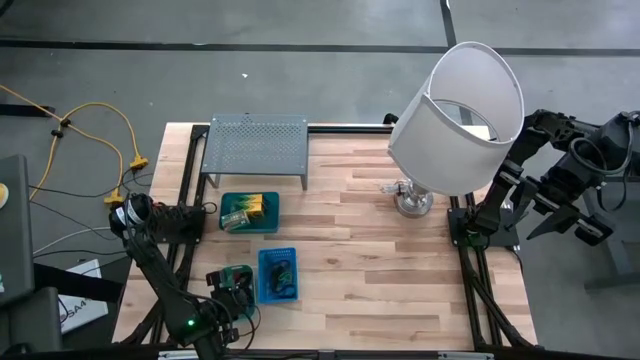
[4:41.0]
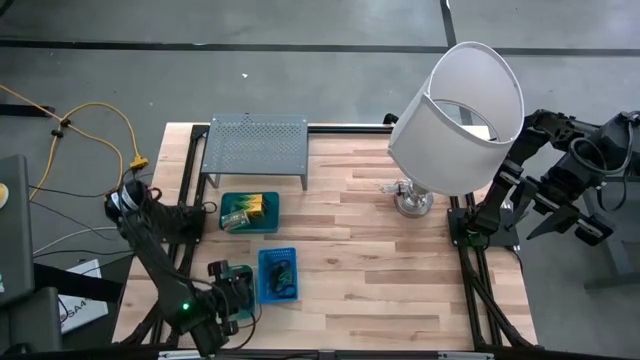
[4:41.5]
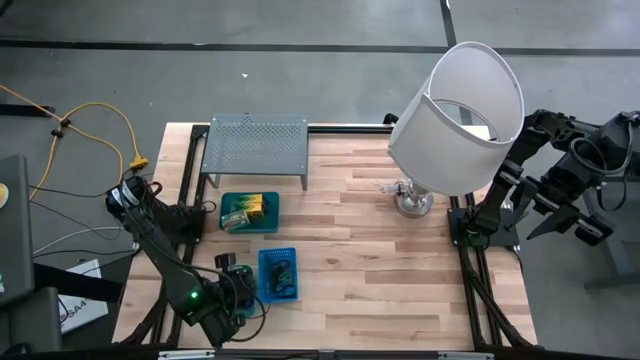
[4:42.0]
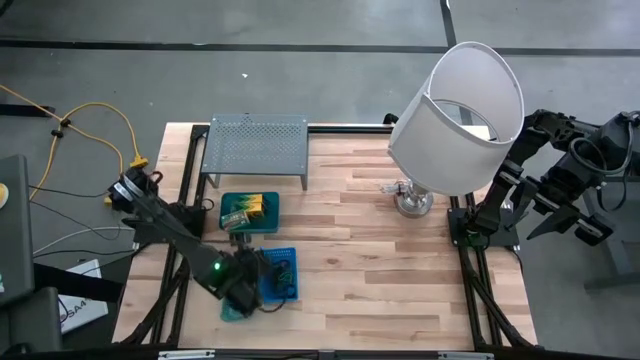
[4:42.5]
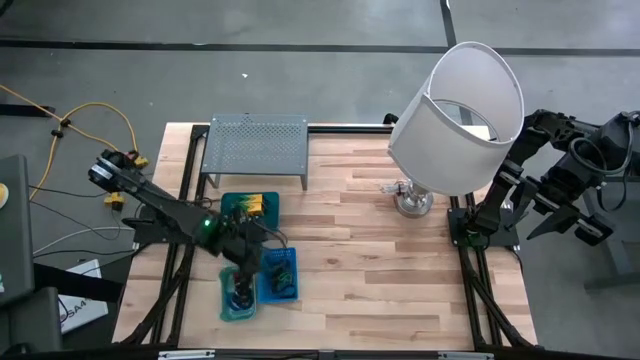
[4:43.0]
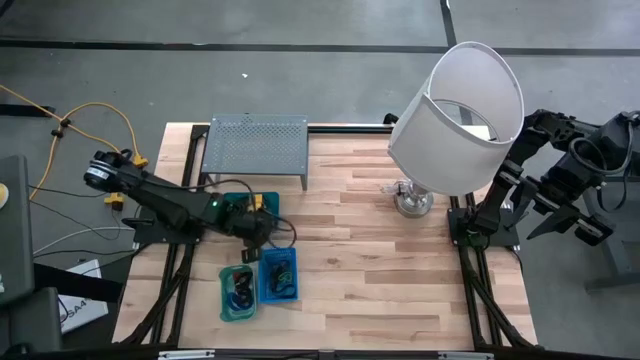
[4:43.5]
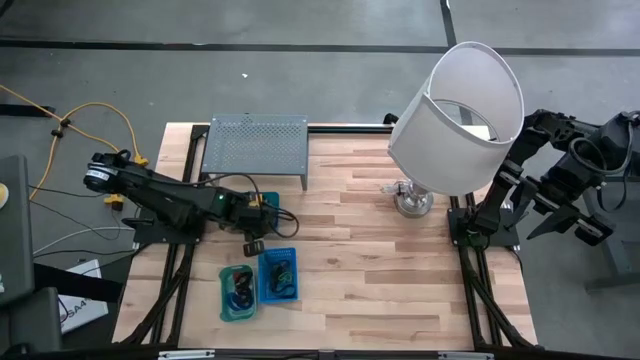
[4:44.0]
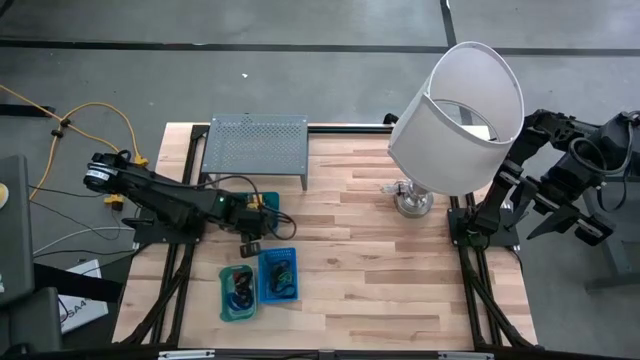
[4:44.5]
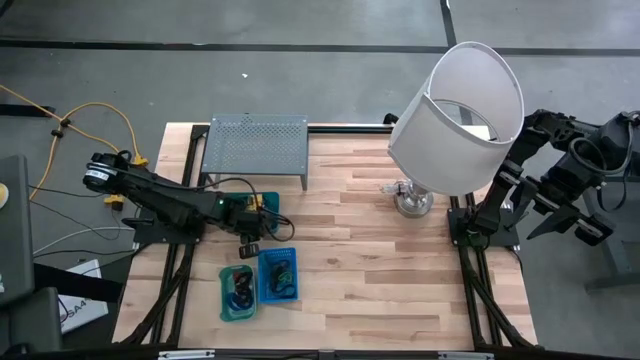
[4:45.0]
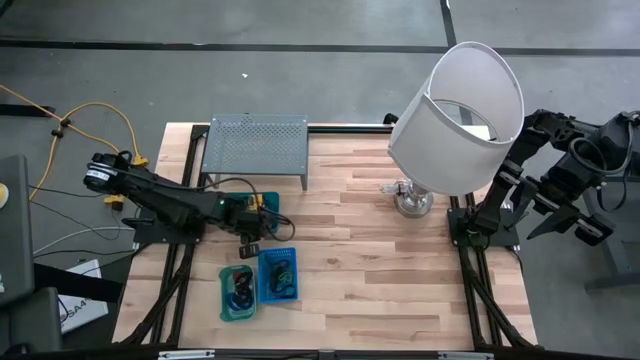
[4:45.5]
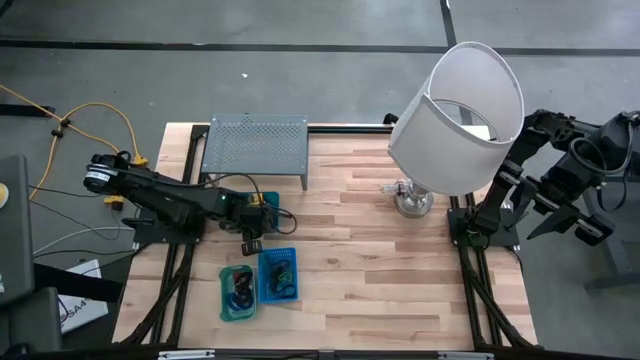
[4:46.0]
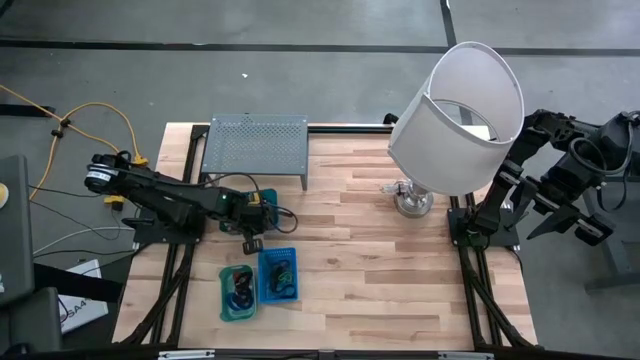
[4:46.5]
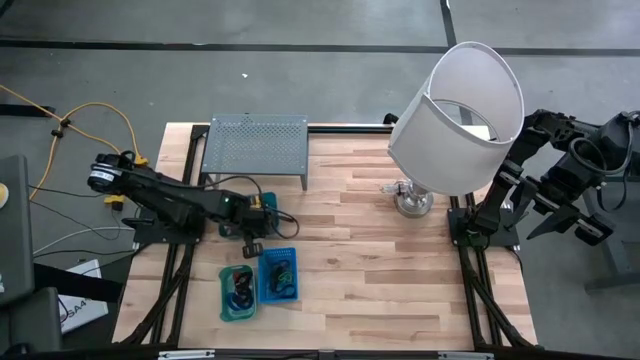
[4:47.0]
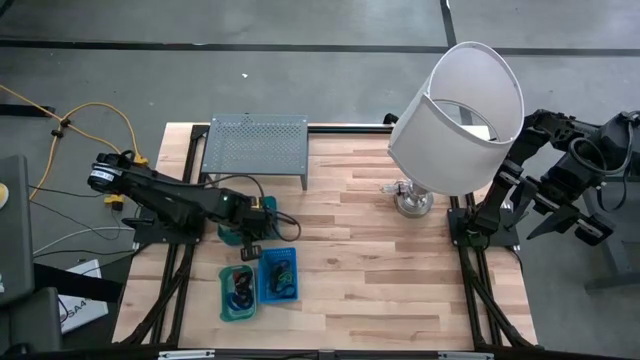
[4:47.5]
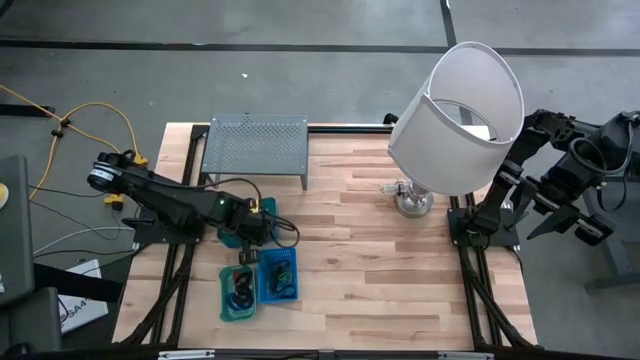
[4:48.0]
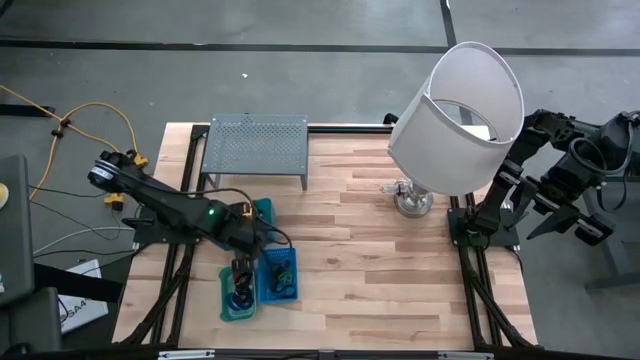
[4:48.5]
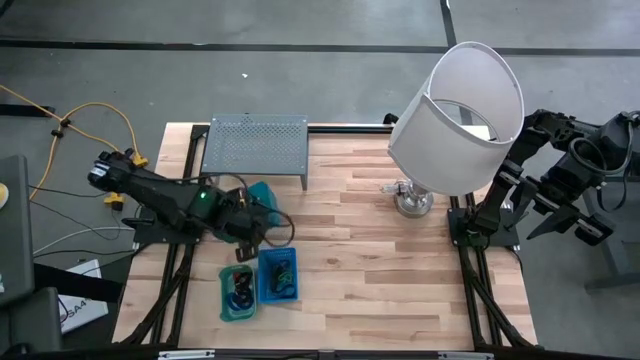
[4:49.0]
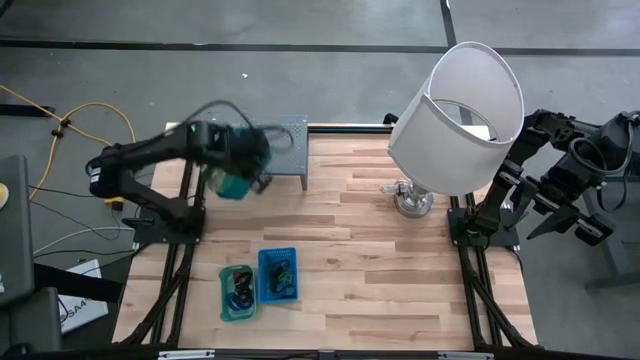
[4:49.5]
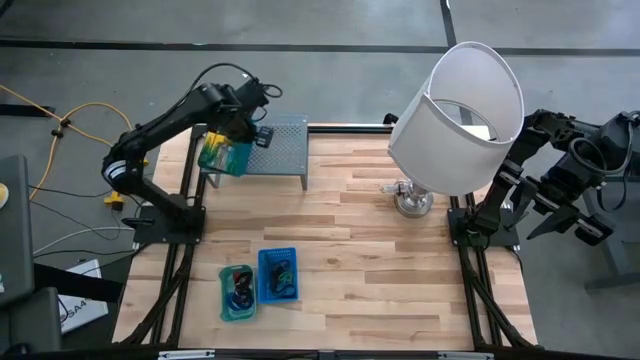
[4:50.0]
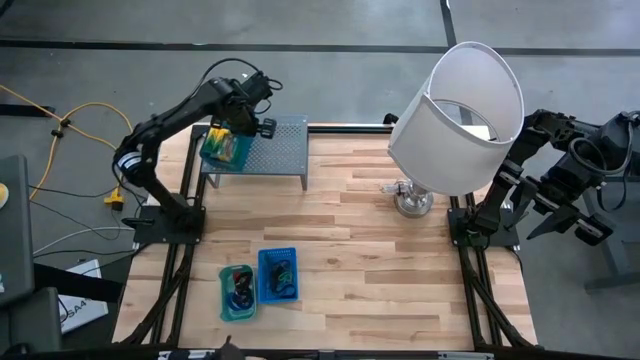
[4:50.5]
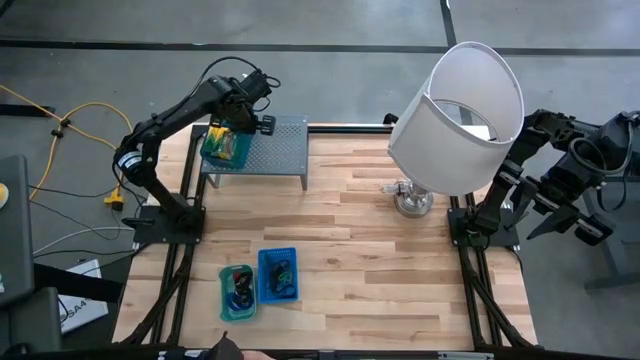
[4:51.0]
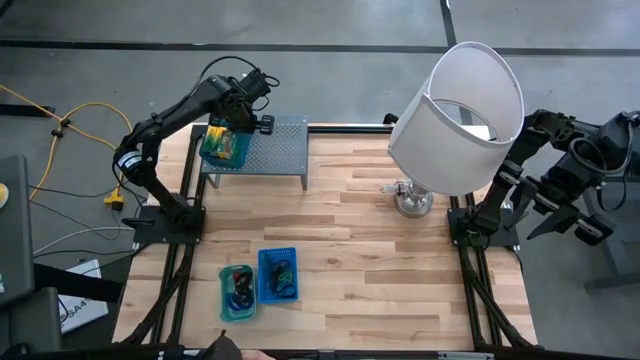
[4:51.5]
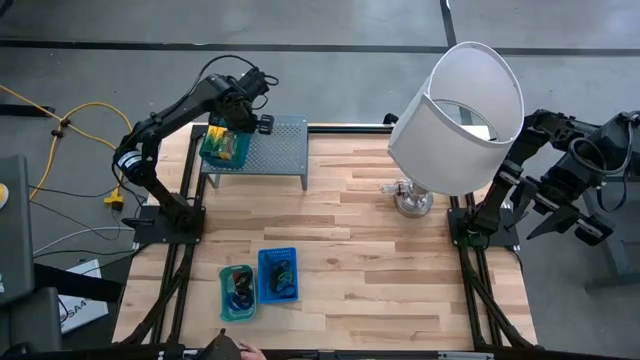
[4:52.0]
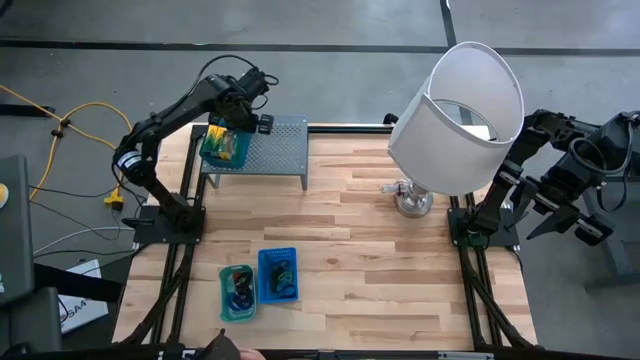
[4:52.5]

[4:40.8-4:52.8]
Task: Pick & Place Office Desk Supplies
Put the top blue bin on the shelf

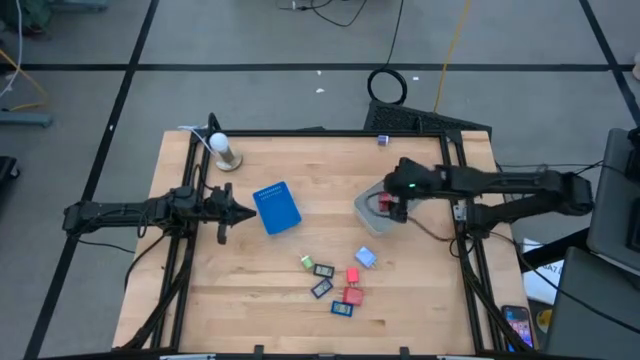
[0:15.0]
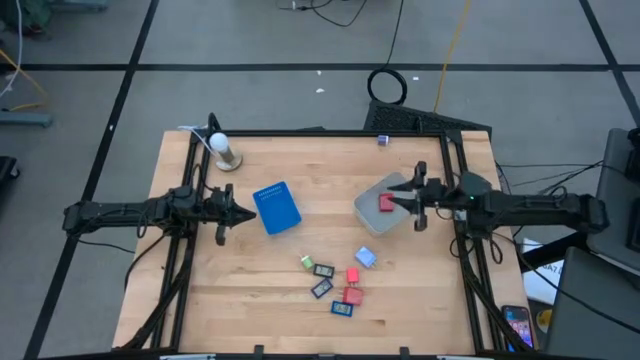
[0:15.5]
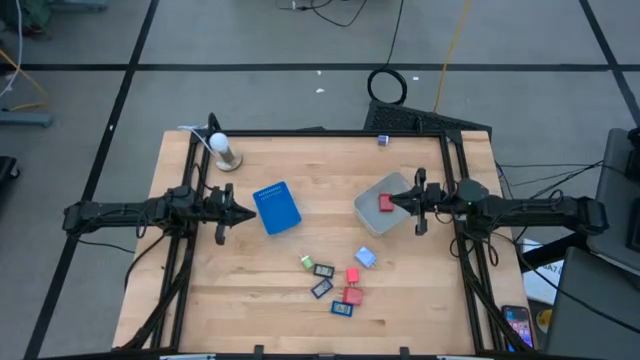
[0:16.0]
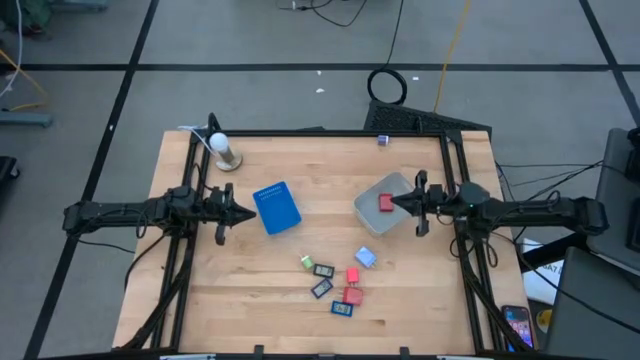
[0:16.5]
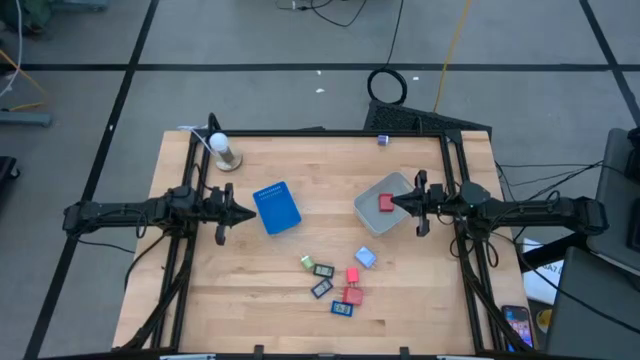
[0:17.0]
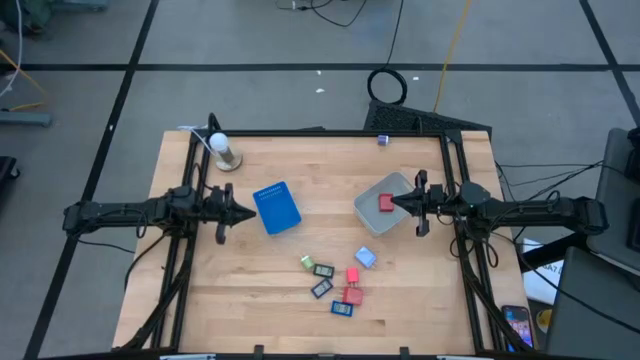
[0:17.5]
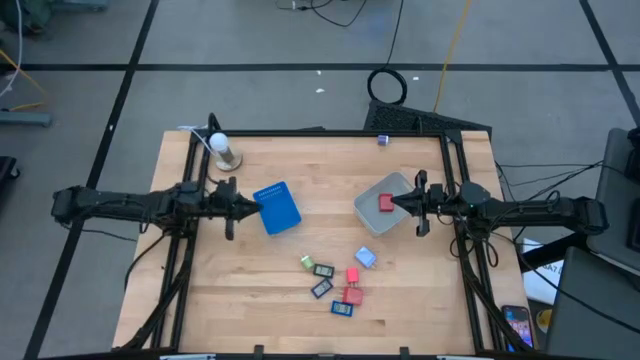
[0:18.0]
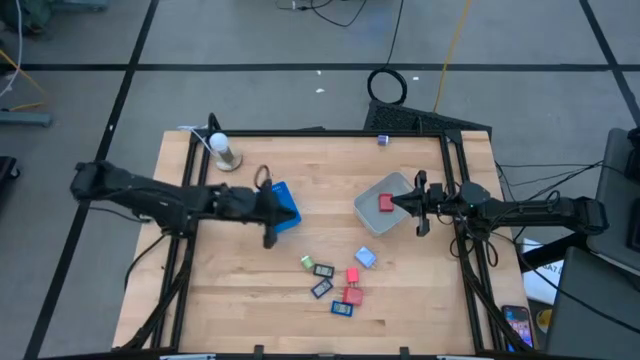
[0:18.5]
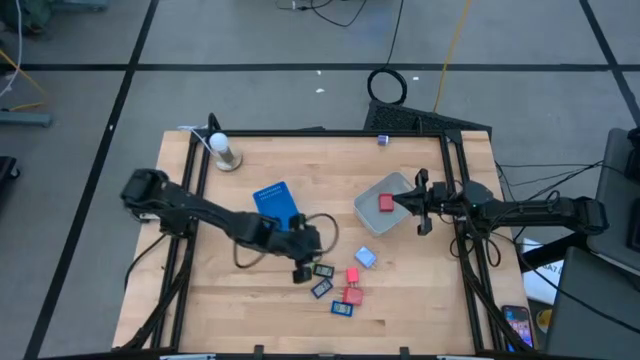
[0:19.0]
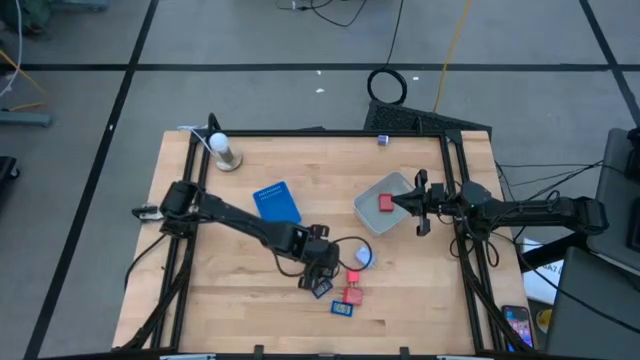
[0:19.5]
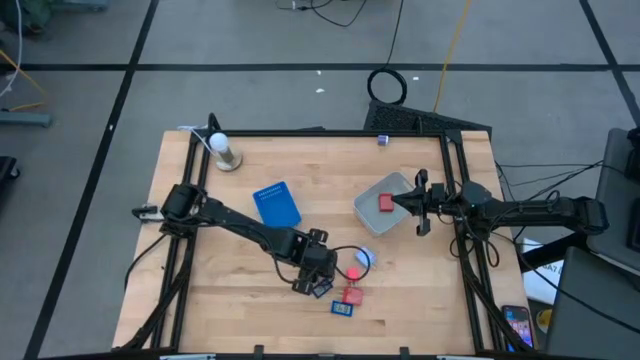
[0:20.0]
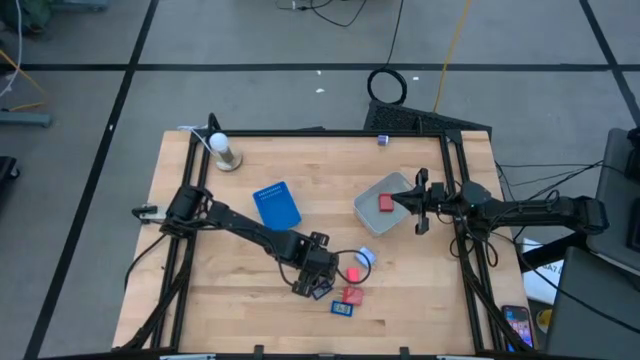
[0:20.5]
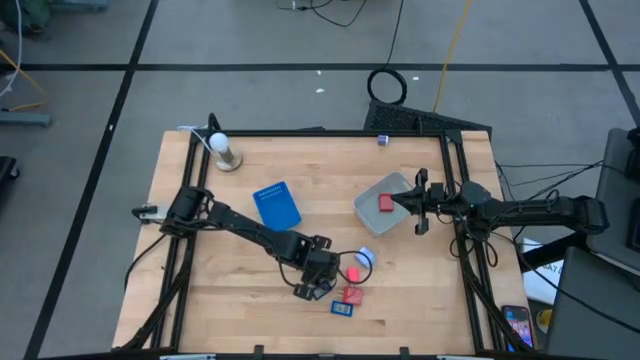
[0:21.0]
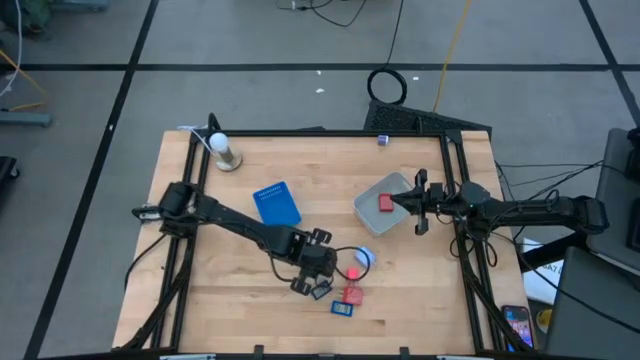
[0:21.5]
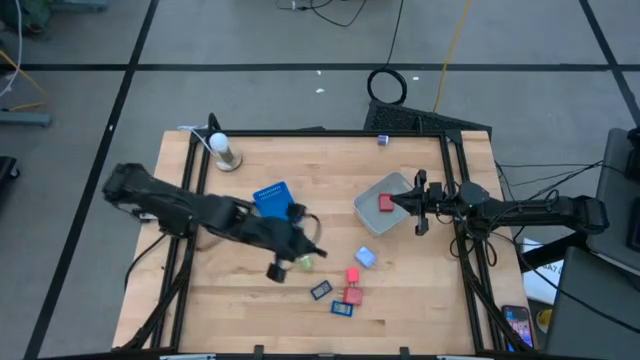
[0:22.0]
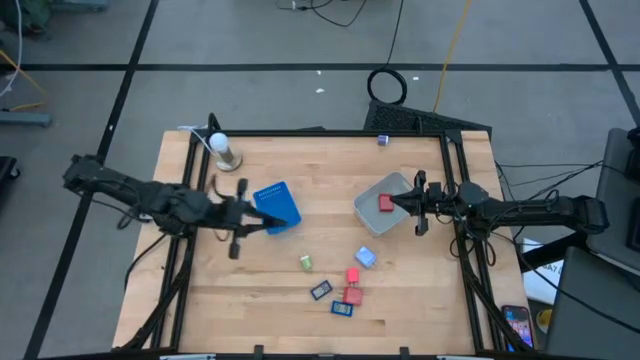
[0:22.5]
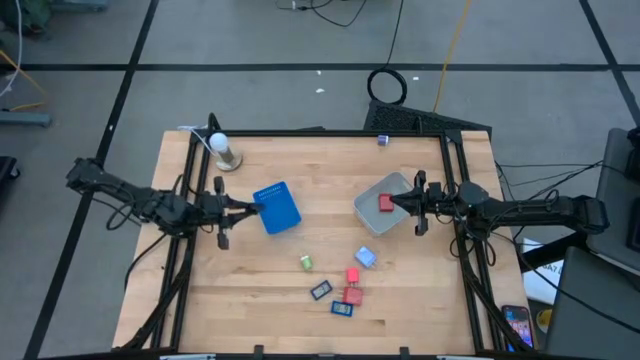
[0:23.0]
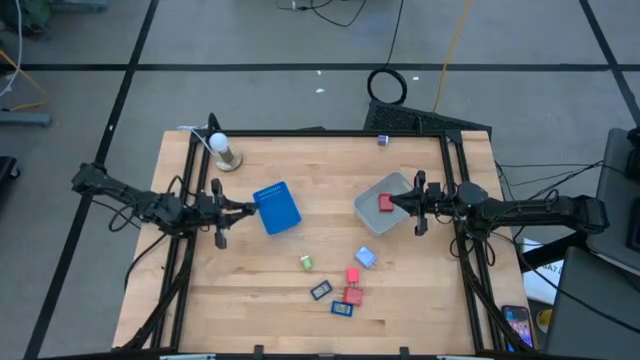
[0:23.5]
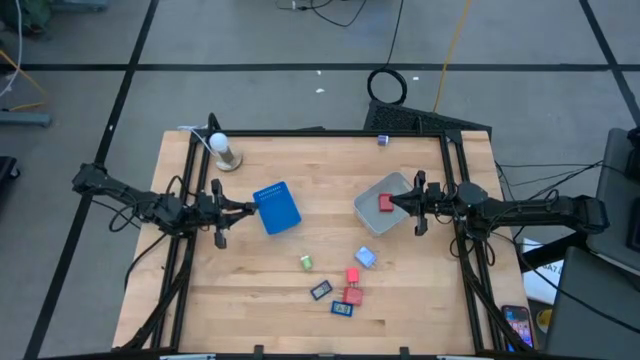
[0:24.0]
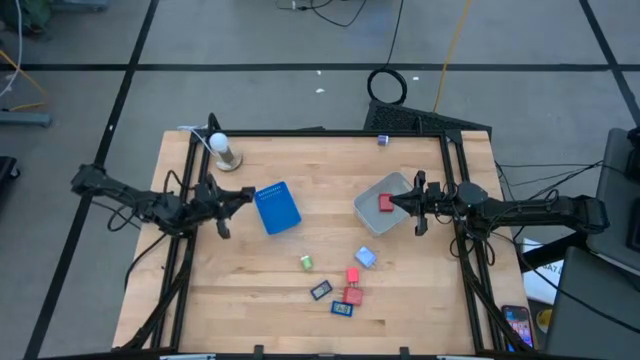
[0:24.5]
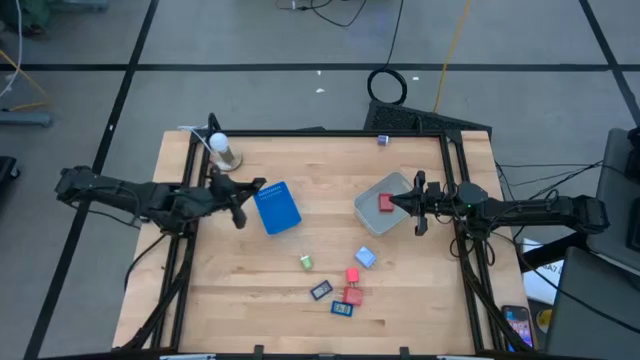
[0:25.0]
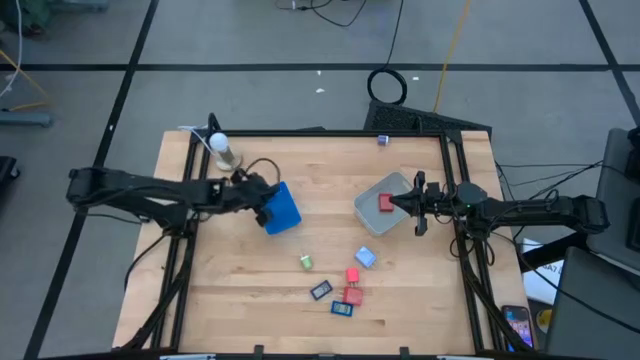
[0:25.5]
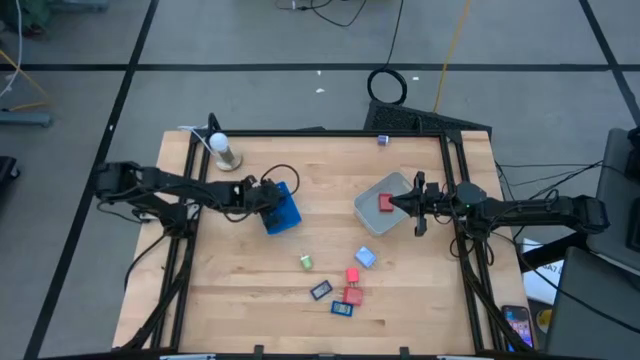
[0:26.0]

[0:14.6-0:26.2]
Task: Pick & Place Office items
Put the black digital timer into the blue bin
